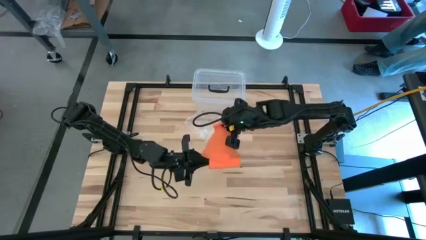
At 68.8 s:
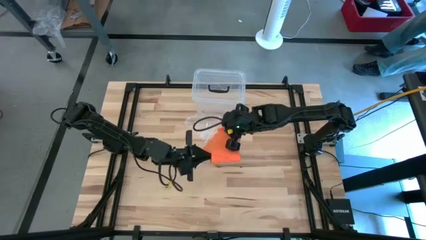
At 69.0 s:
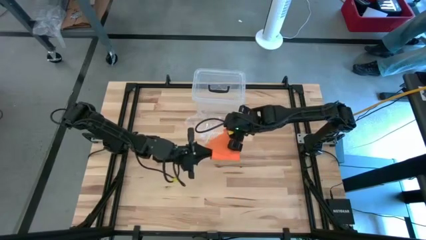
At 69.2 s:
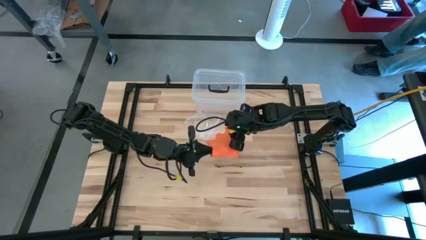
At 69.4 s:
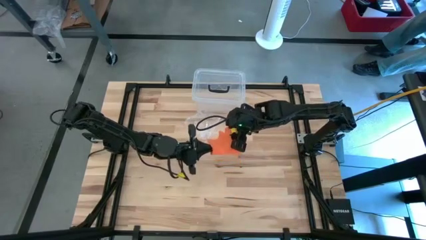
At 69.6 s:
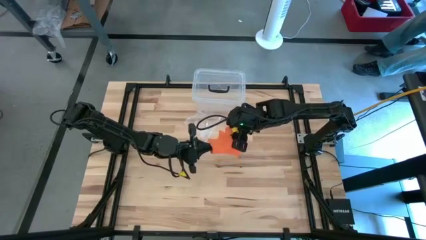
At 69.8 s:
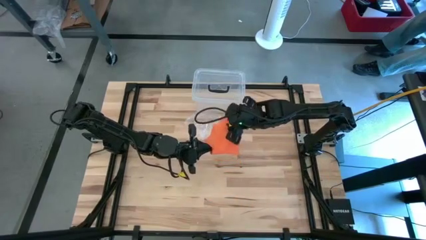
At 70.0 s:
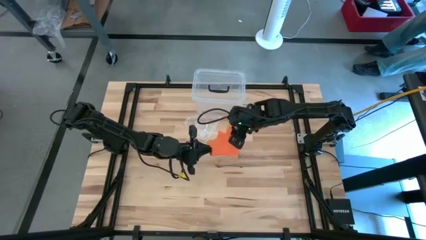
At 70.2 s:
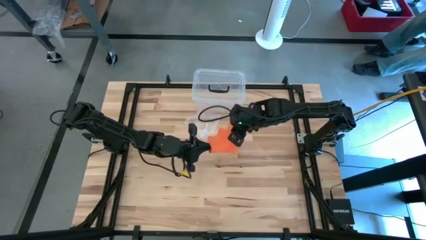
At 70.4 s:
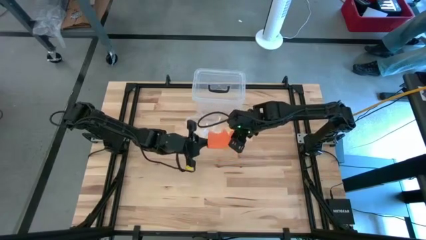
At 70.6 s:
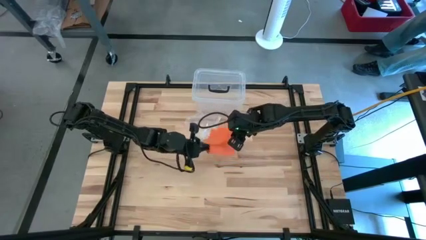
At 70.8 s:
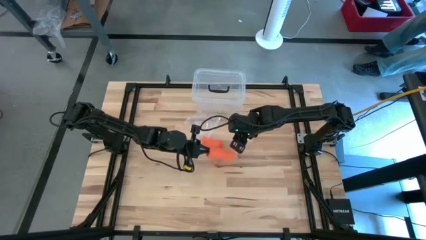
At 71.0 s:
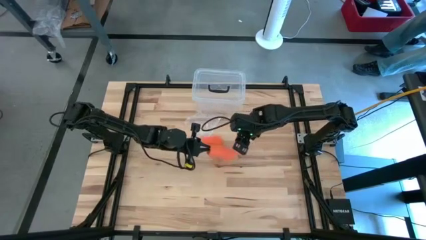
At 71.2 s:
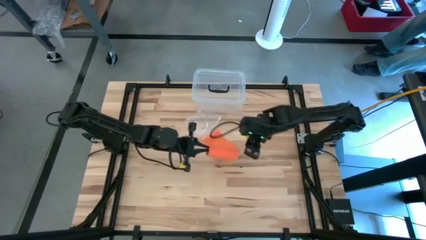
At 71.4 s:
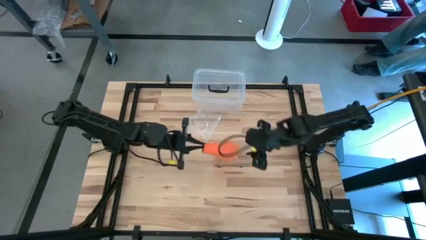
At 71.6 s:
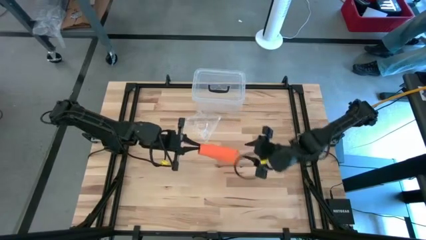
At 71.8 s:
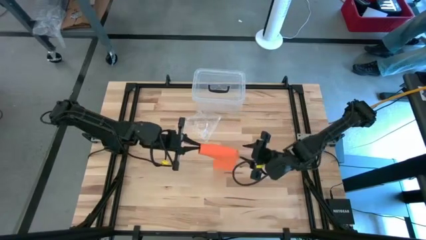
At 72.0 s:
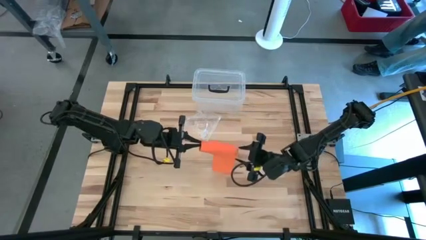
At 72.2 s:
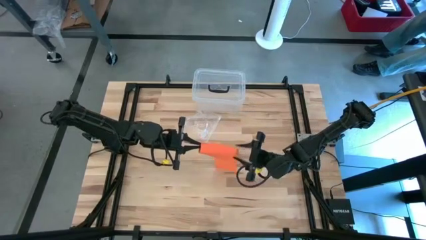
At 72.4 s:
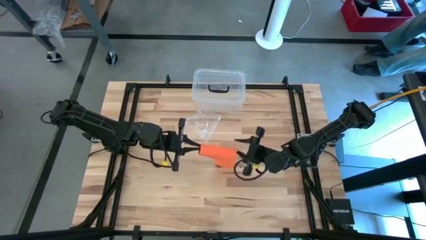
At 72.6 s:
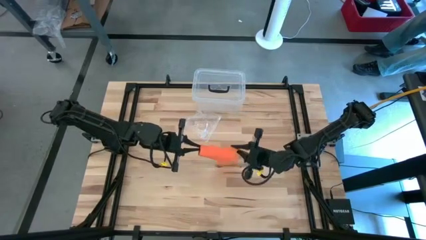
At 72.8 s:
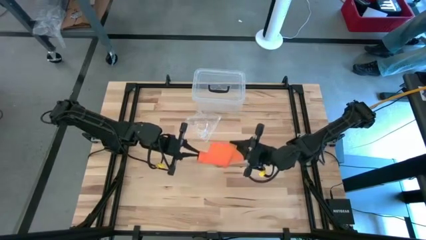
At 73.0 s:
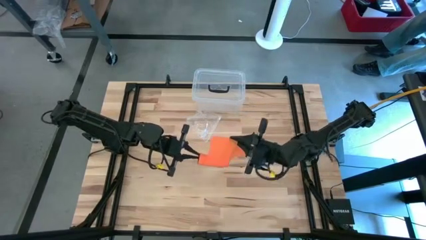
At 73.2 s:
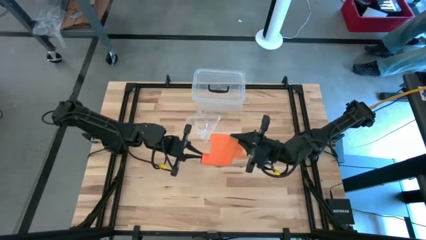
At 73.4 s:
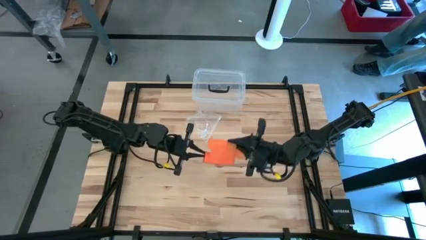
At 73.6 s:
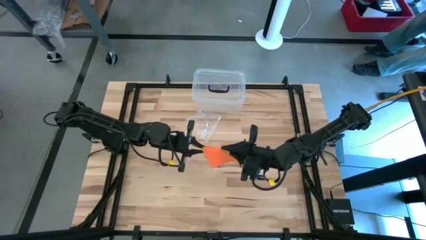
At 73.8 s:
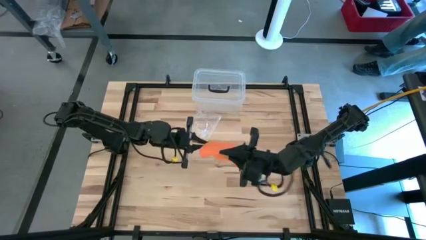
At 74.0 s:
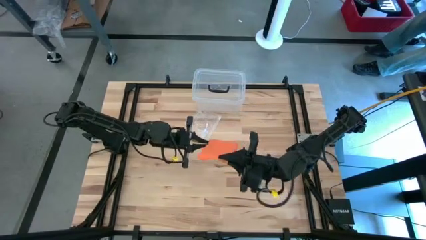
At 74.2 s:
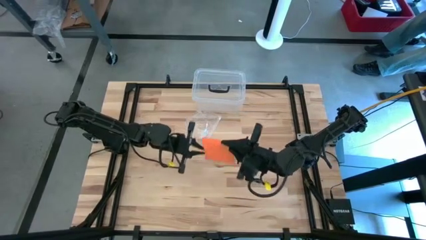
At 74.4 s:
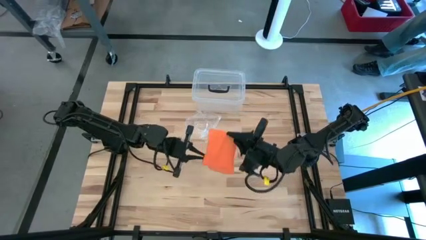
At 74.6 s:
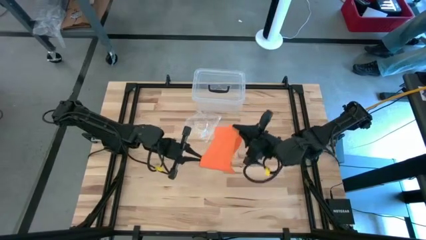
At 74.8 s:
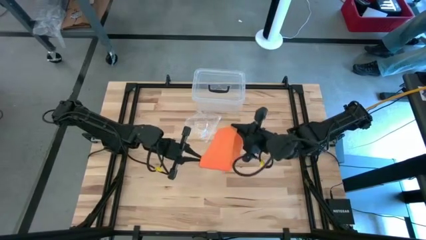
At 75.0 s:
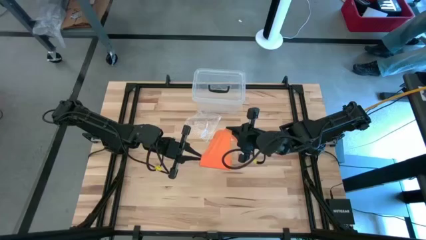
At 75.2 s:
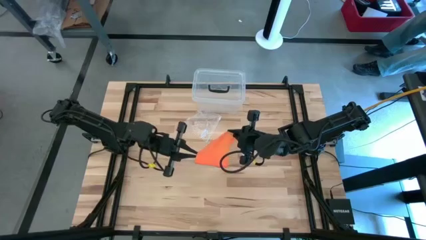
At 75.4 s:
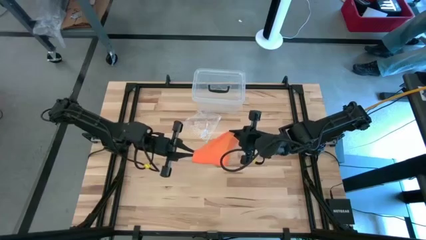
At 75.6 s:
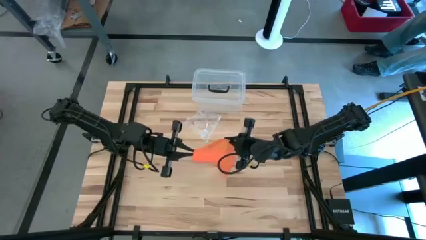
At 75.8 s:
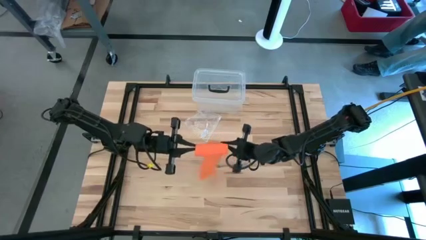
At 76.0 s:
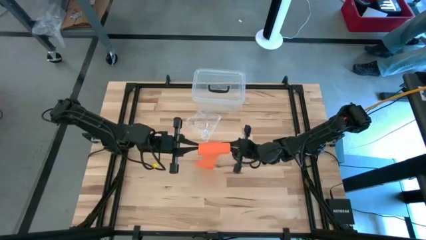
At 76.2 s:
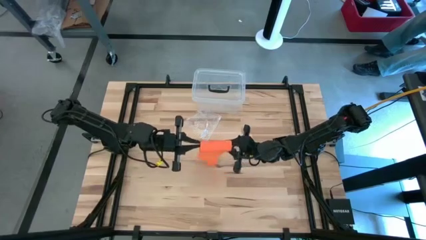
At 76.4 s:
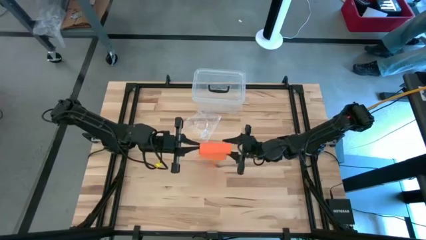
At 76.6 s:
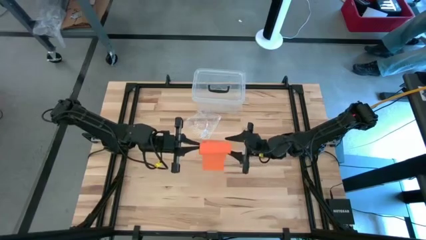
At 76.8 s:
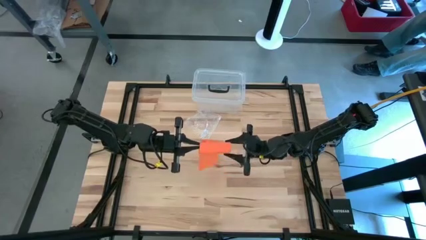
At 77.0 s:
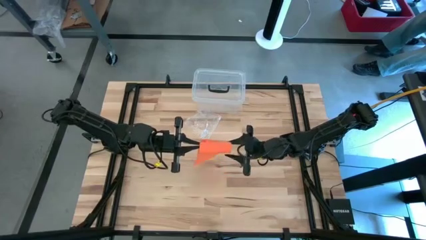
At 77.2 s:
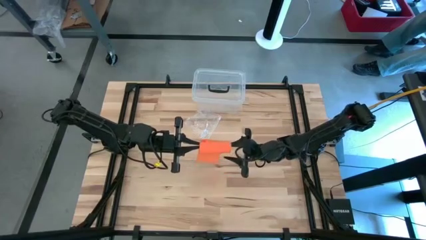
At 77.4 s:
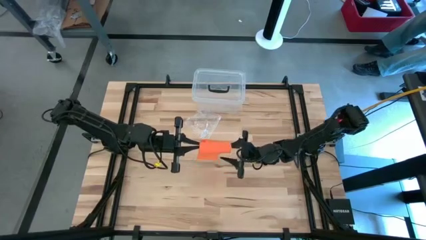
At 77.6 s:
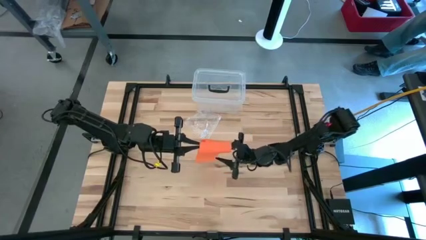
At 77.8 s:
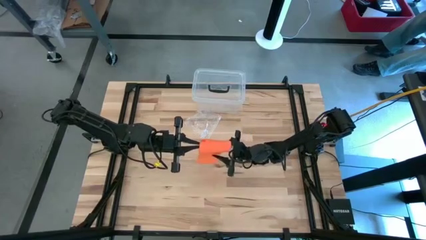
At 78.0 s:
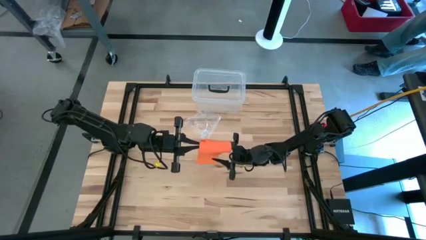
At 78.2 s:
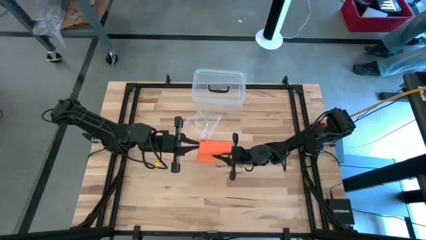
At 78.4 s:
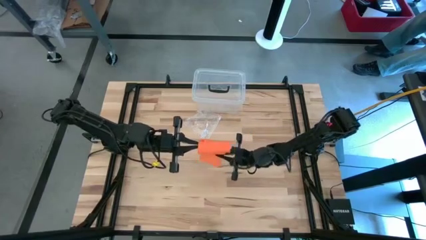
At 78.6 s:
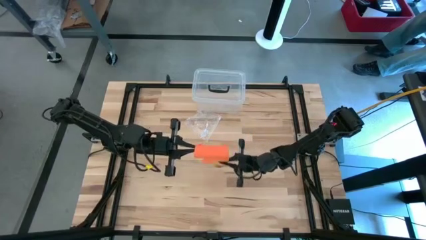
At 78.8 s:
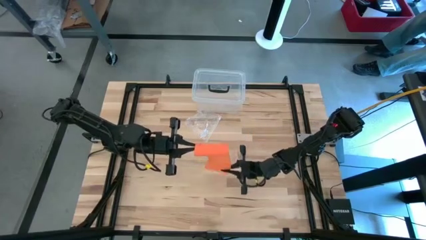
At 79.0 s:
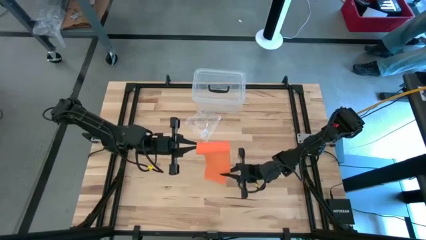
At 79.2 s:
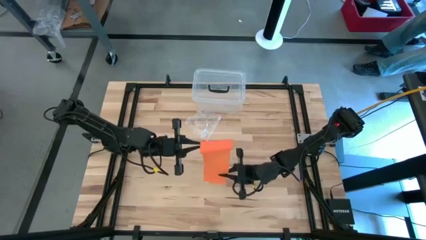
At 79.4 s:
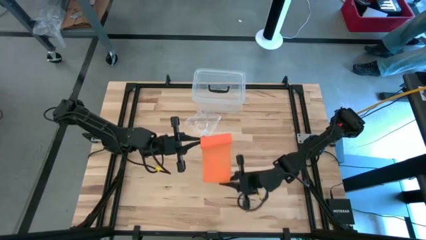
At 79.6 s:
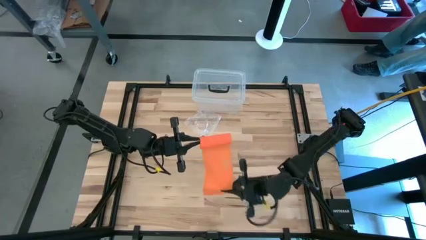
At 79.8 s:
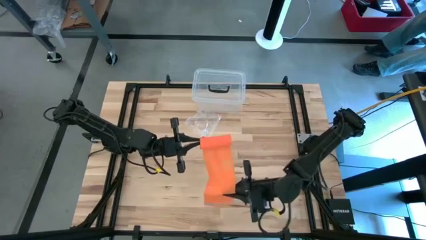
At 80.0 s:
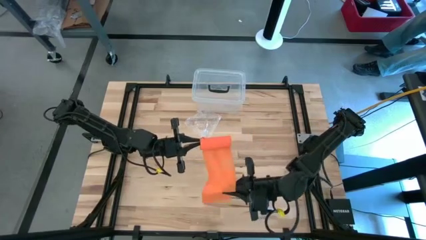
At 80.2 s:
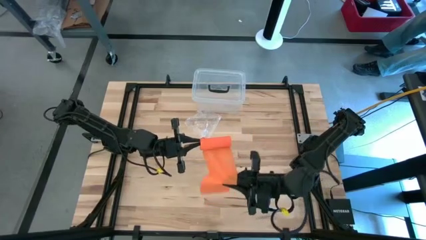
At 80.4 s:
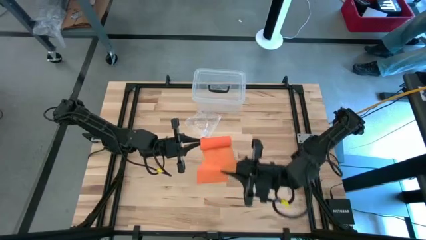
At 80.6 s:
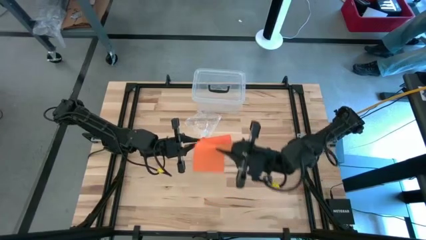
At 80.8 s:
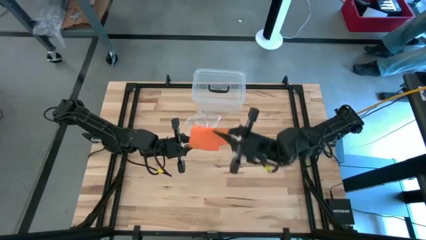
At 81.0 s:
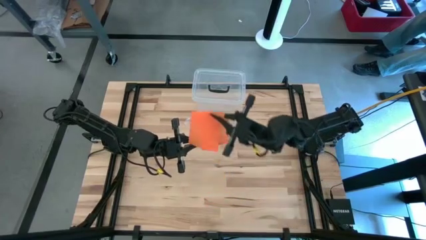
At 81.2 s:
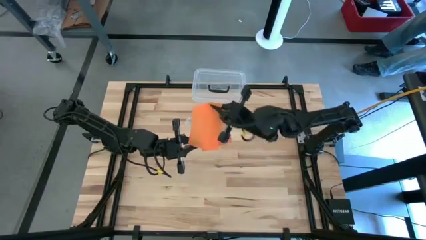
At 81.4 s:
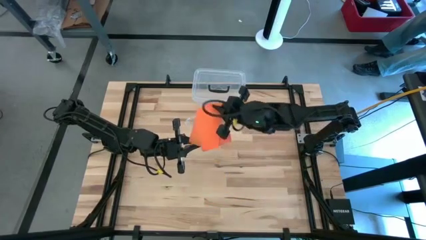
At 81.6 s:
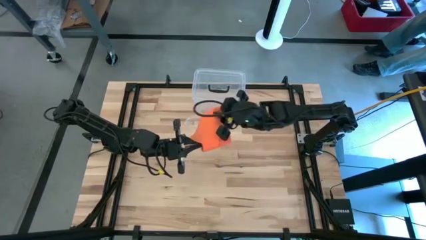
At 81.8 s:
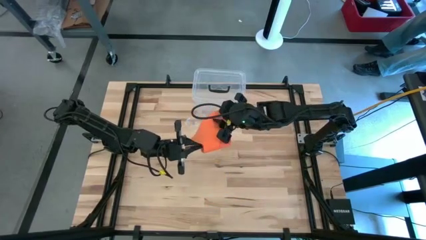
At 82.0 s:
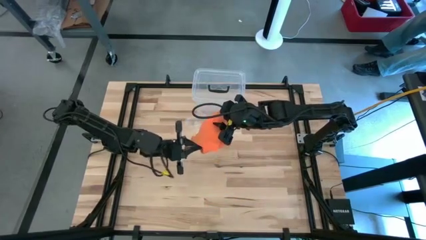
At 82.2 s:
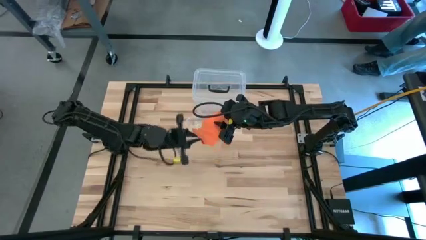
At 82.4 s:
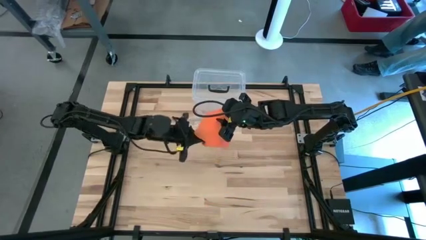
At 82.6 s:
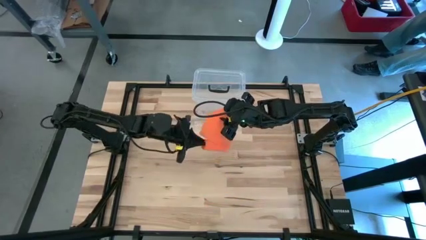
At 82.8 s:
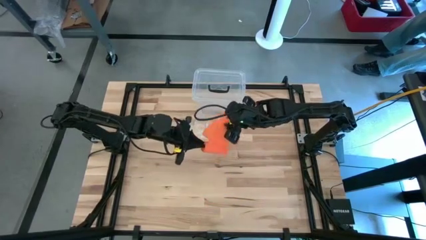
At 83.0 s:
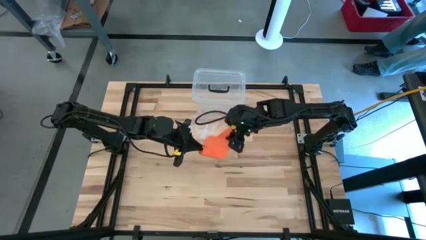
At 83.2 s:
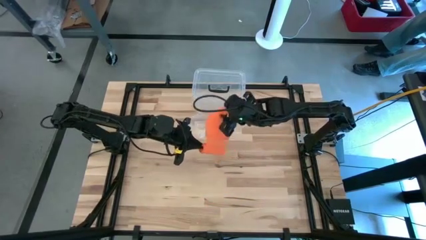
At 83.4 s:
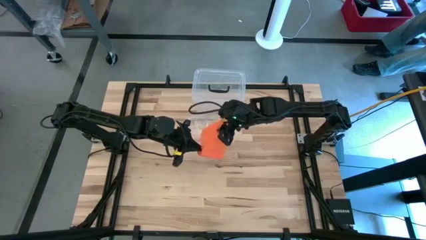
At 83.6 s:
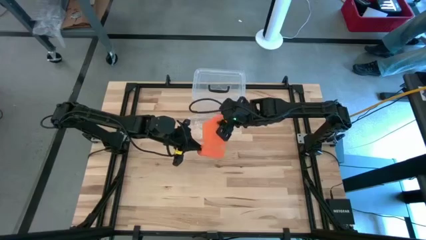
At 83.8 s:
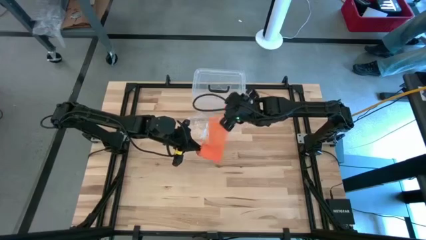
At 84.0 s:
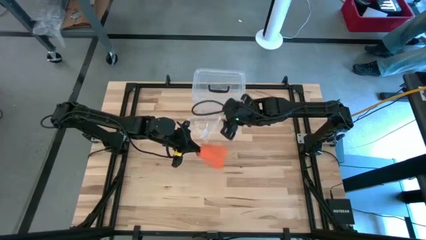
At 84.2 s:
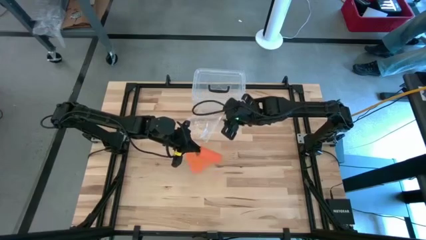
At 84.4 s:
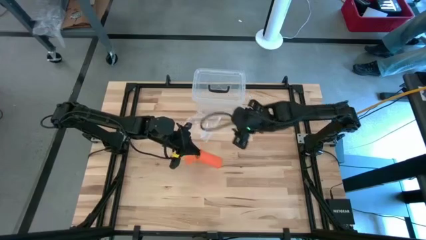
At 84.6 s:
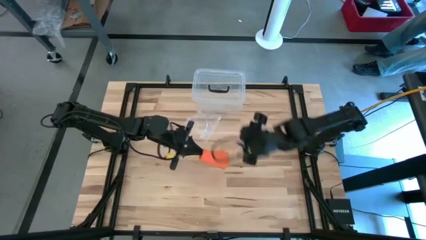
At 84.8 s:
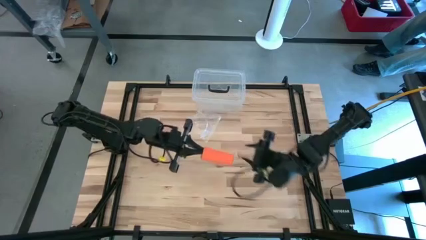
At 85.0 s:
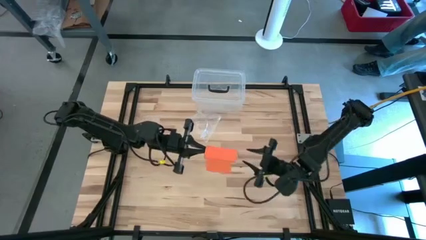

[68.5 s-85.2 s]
Task: Roll bandage
Roll the orange bandage
